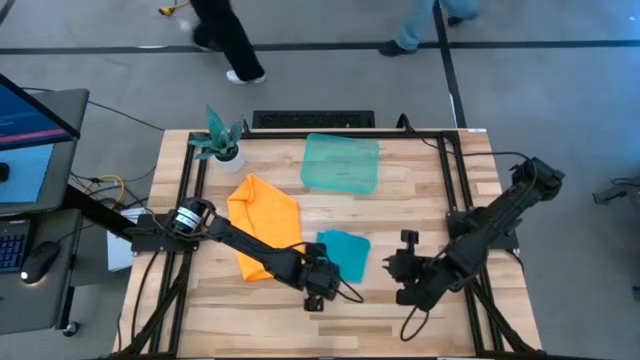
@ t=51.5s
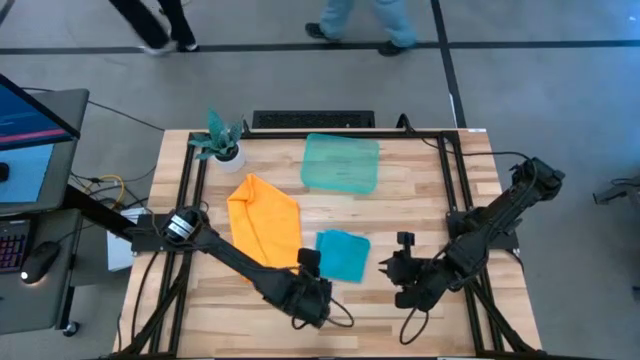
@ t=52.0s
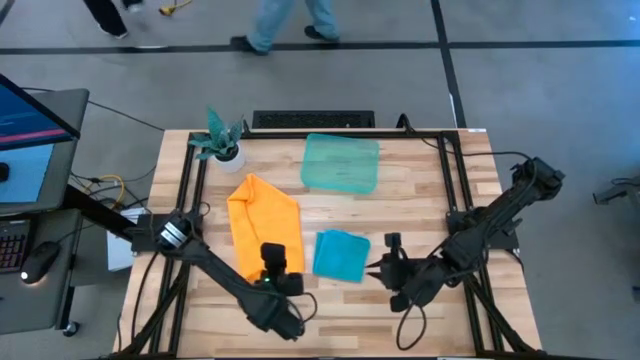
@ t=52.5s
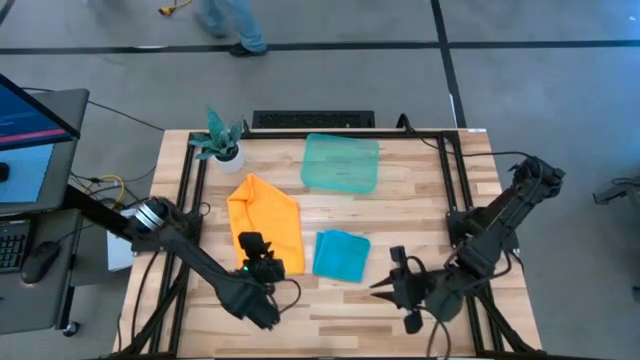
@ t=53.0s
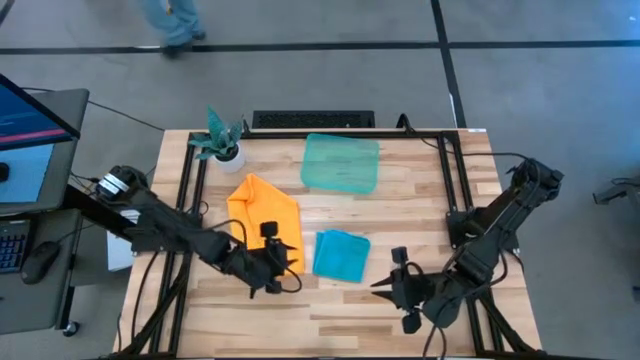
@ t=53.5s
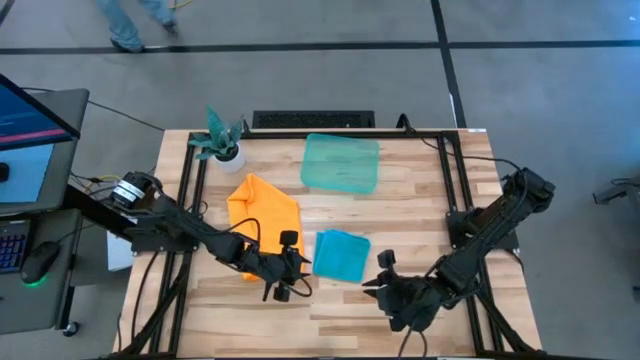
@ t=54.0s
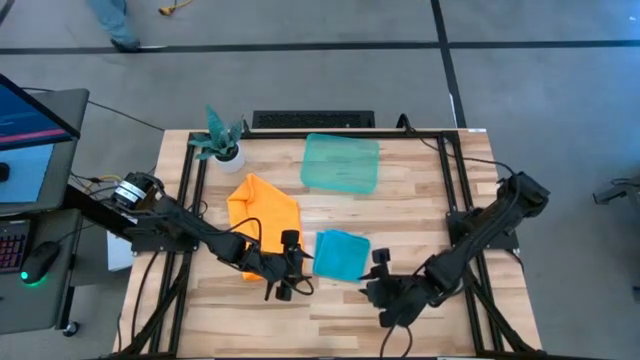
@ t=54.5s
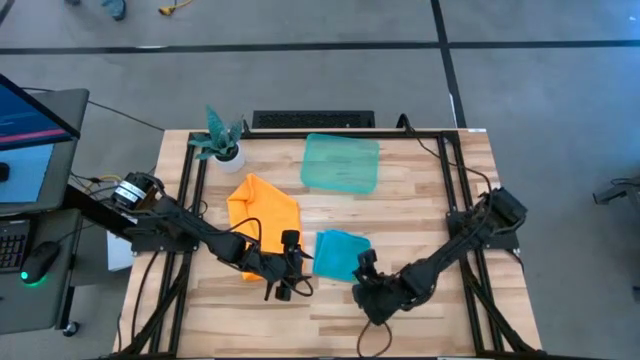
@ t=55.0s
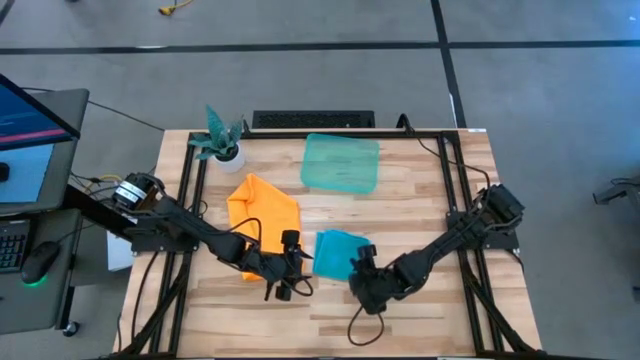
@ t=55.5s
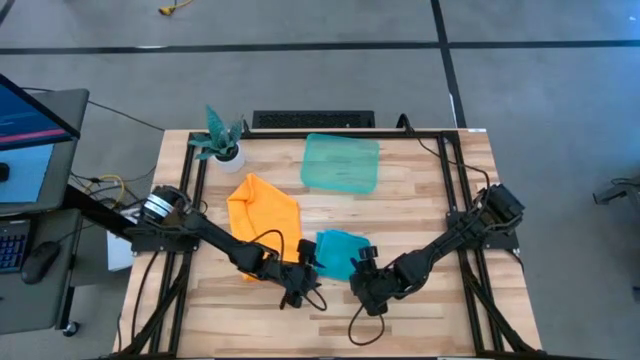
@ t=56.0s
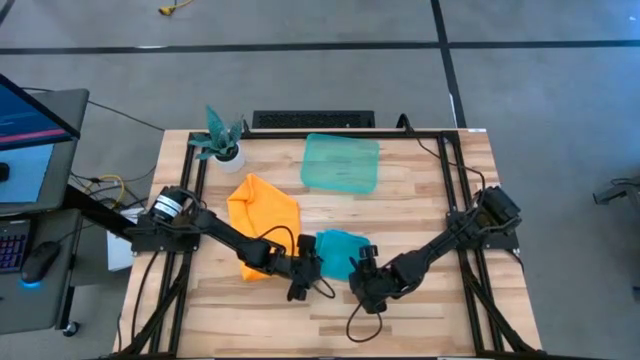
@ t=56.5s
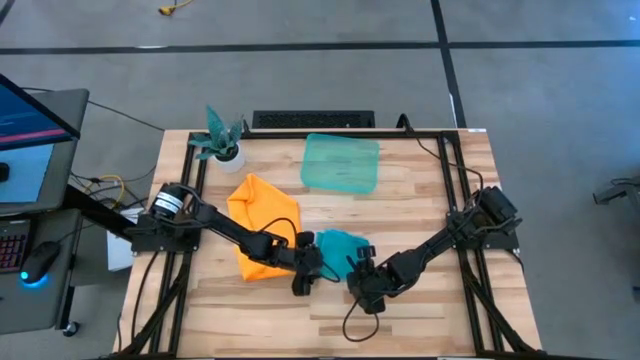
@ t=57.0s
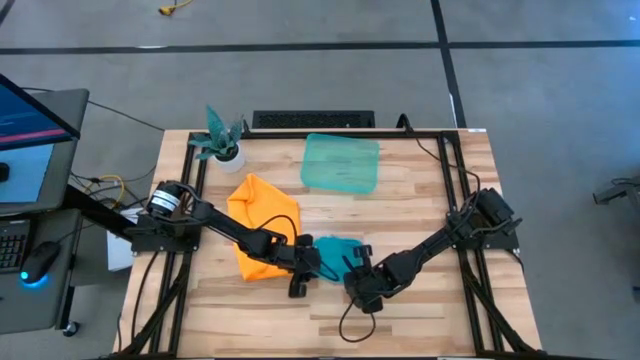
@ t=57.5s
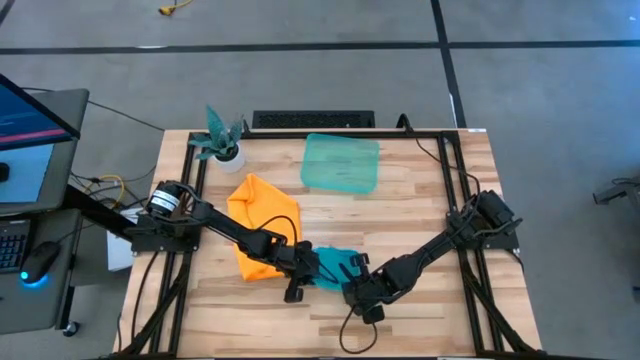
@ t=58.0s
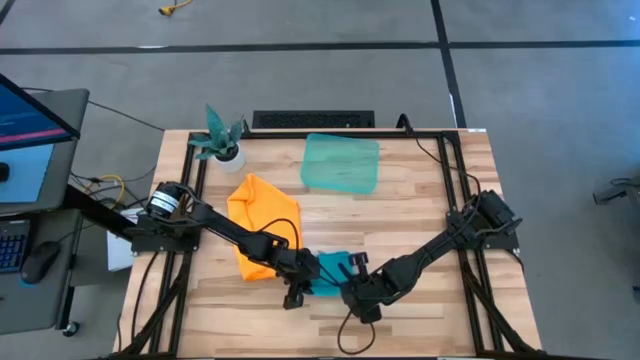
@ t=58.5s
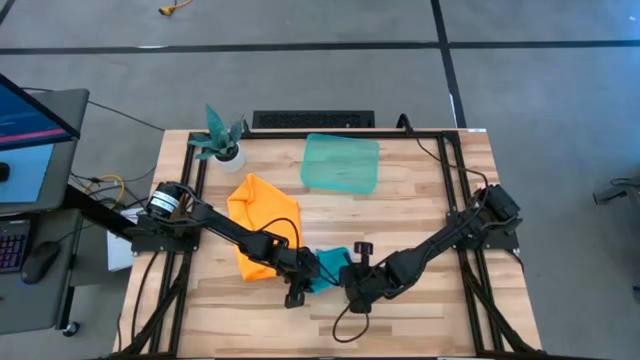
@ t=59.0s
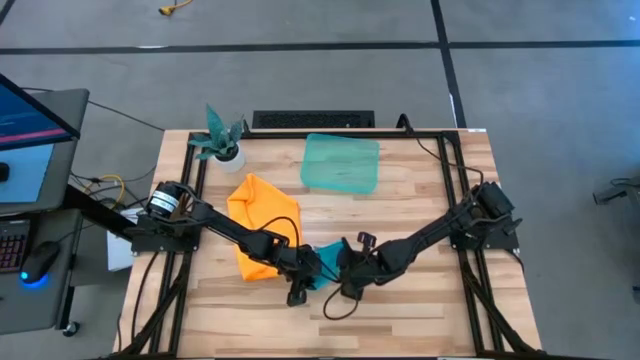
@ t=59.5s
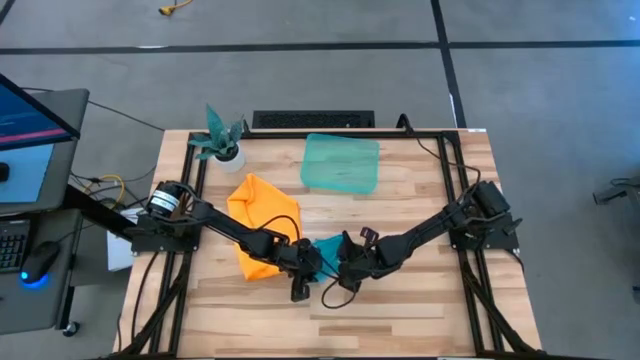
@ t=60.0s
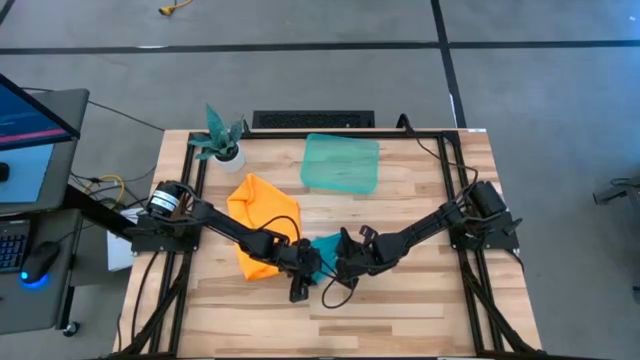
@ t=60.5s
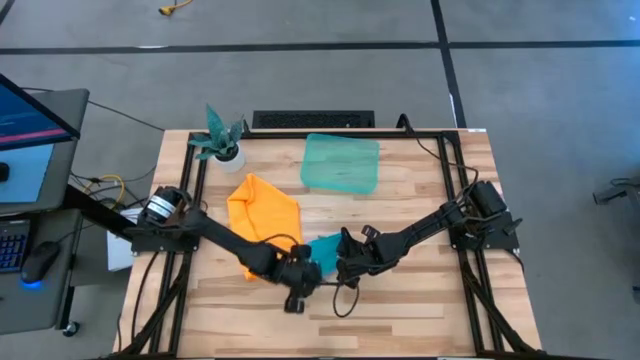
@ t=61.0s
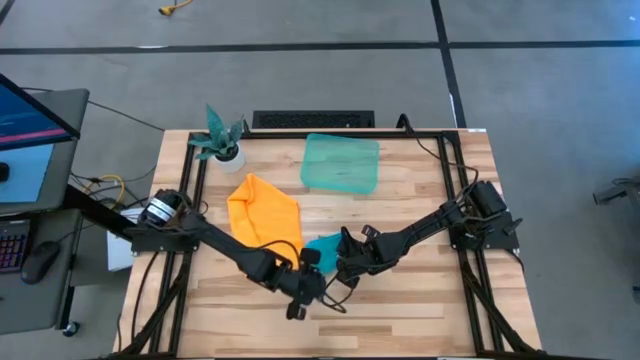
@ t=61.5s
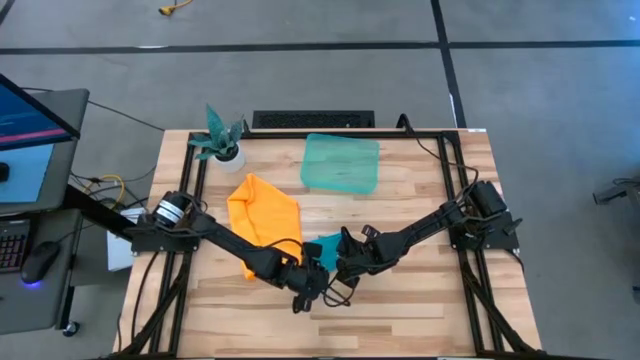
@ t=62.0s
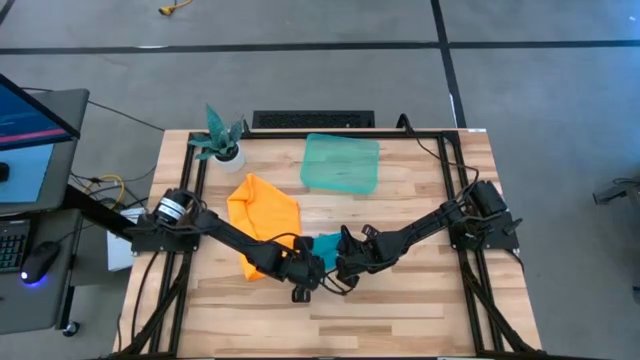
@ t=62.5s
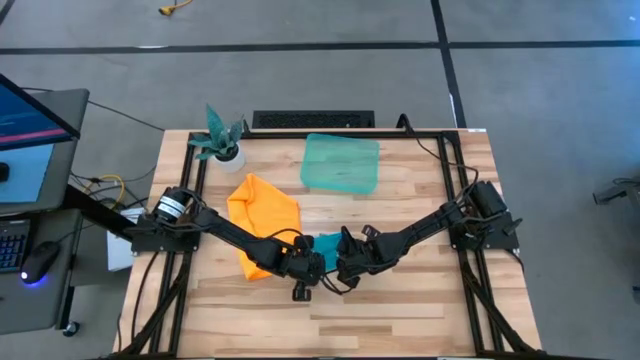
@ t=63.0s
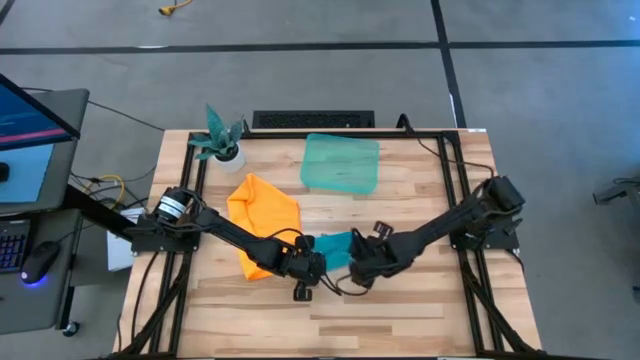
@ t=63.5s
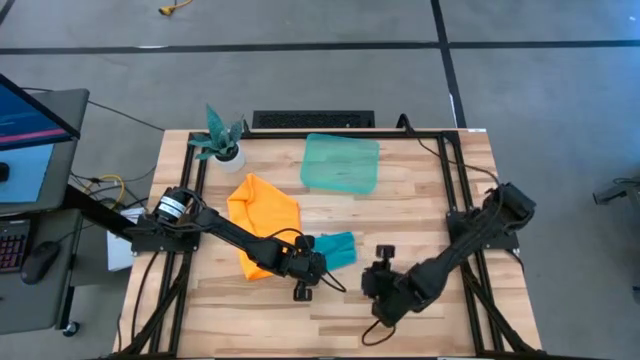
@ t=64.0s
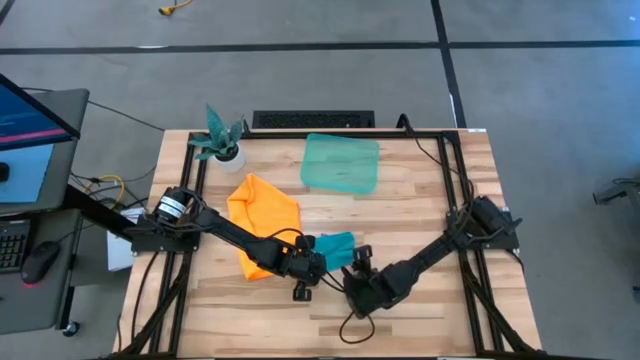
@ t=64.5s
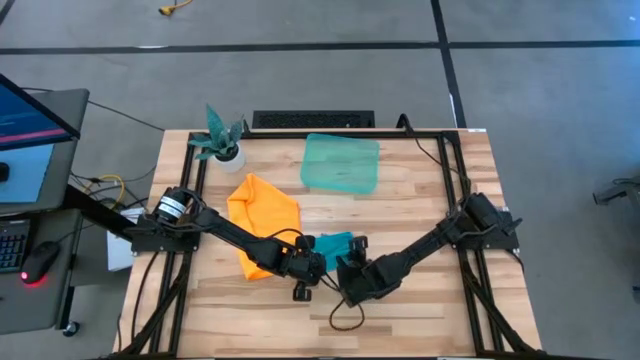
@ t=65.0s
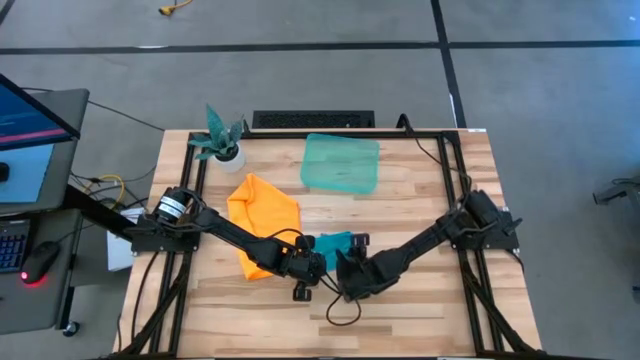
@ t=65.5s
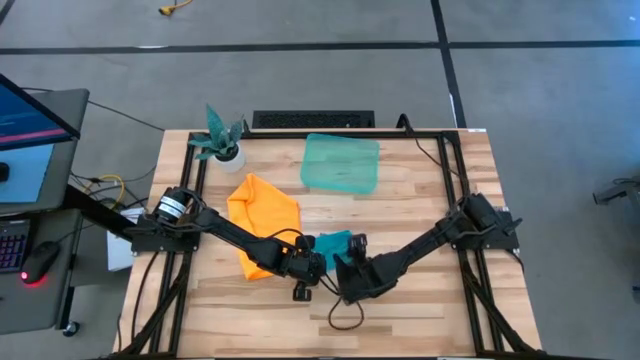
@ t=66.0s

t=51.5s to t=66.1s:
Task: Roll microfiber towels into tight, uniform cylinder then place into a basket
Roll the blue microfiber towel

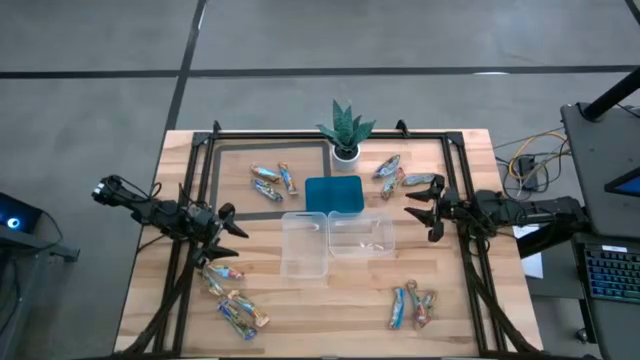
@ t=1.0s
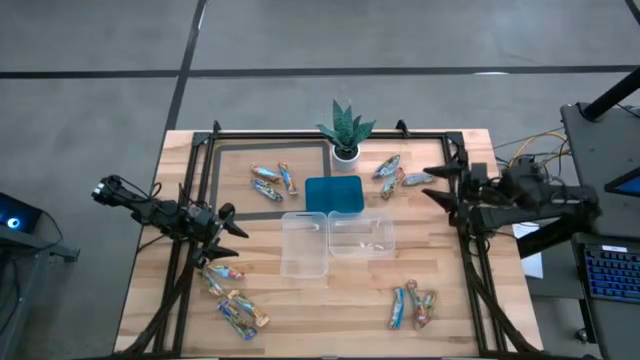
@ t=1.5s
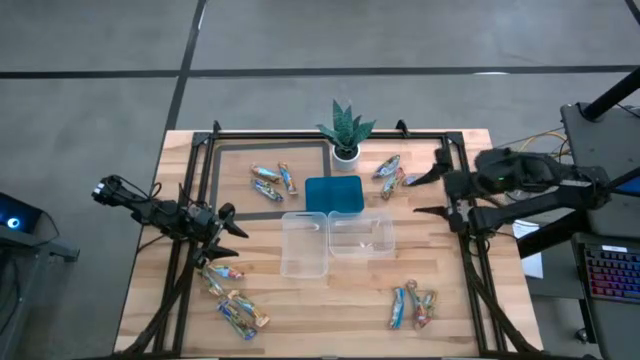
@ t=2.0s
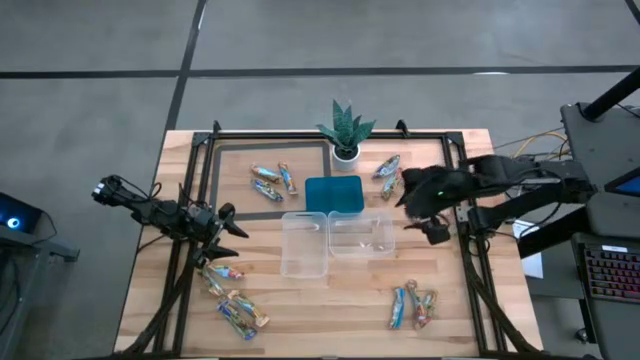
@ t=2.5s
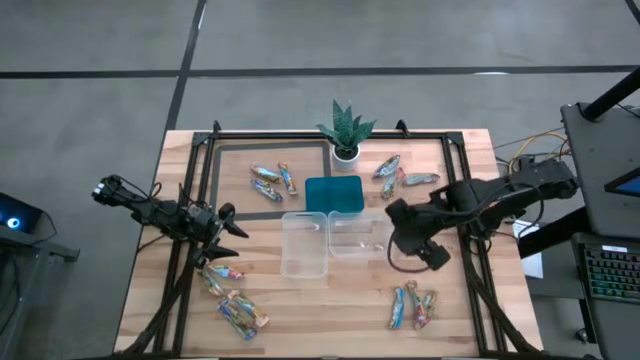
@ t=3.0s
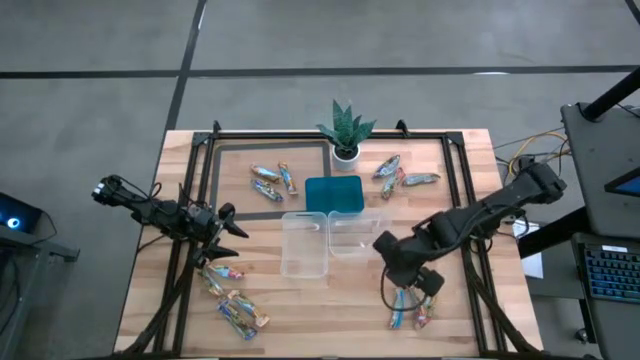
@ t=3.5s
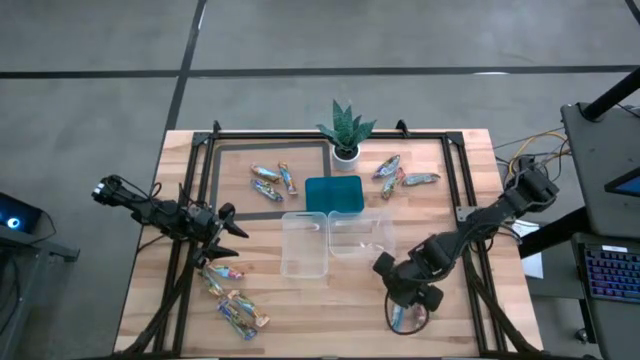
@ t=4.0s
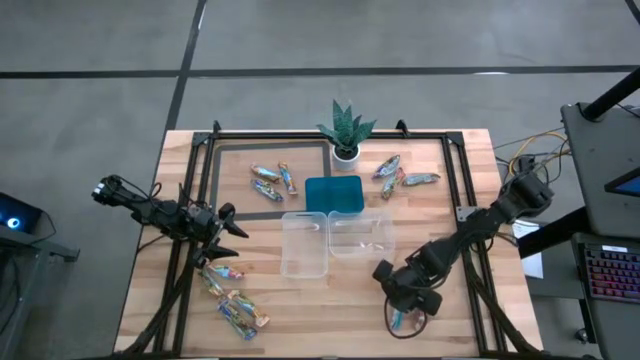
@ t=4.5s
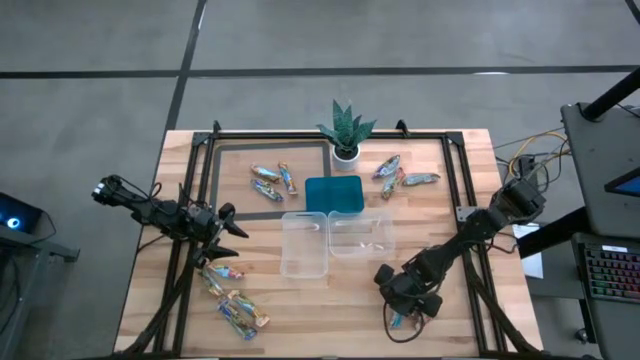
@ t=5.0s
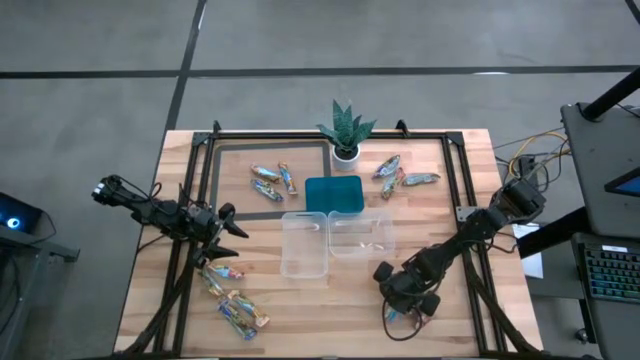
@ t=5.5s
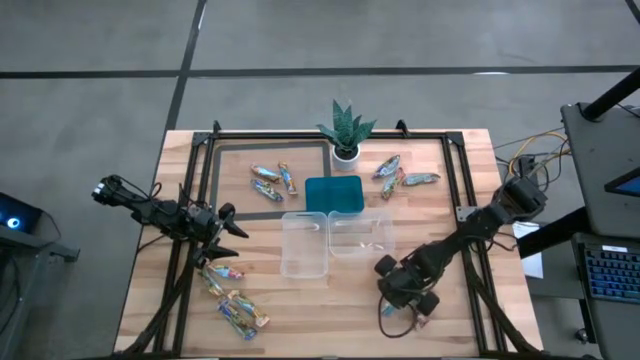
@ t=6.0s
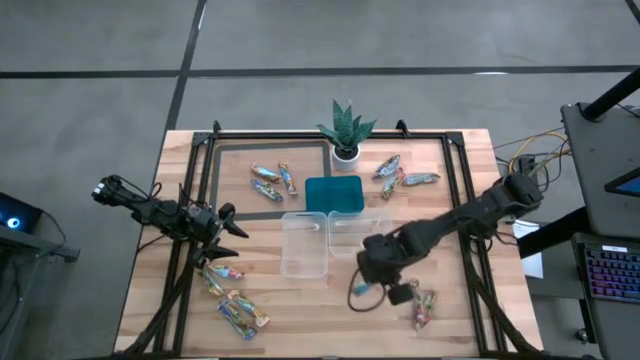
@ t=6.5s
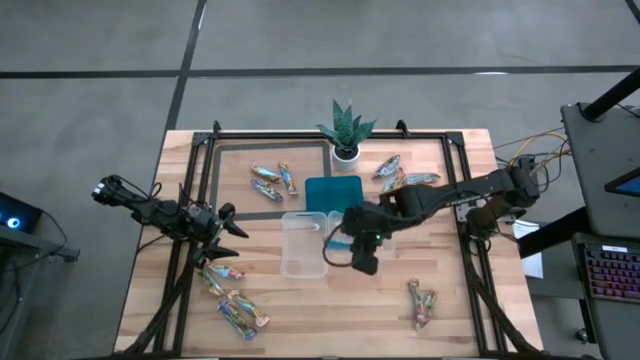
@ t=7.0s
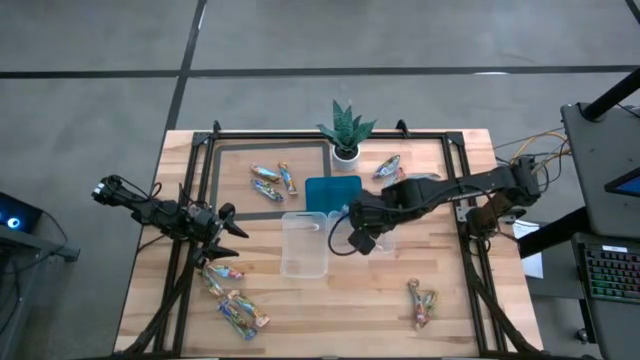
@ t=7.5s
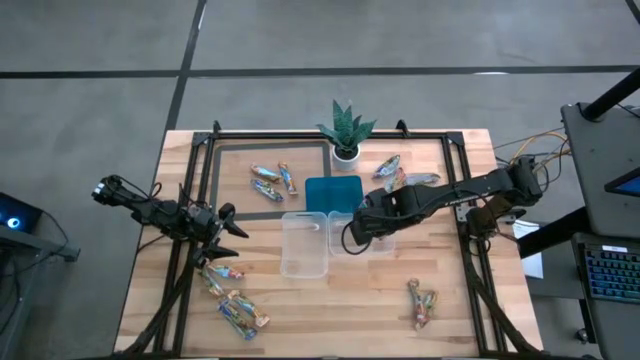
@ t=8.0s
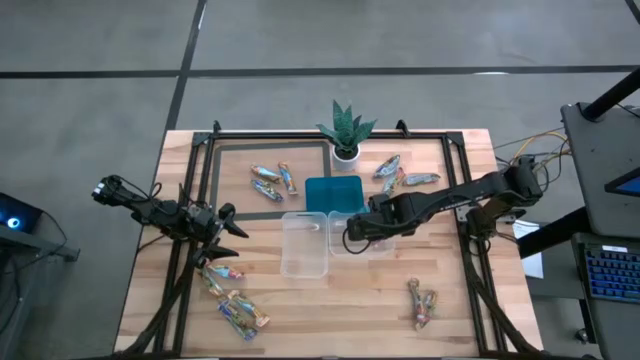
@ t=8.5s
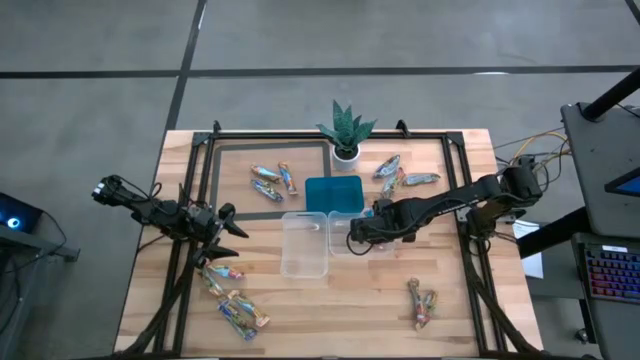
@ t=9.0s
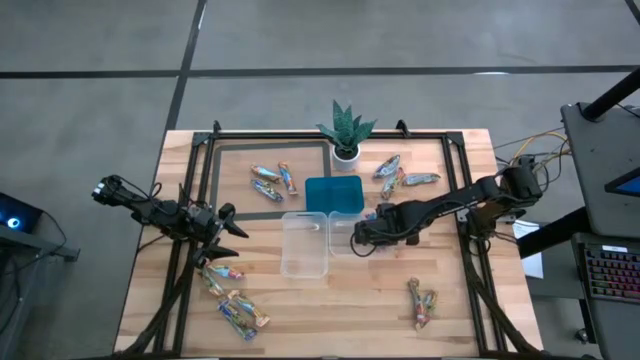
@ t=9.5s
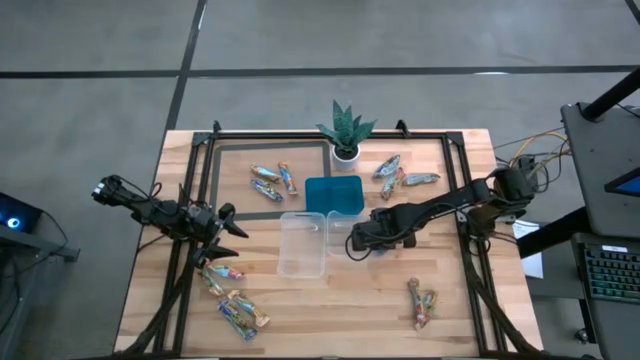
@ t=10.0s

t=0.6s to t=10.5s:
Task: Pick and place Granola Bars by type
Put the red granola bar into the right transparent bin
